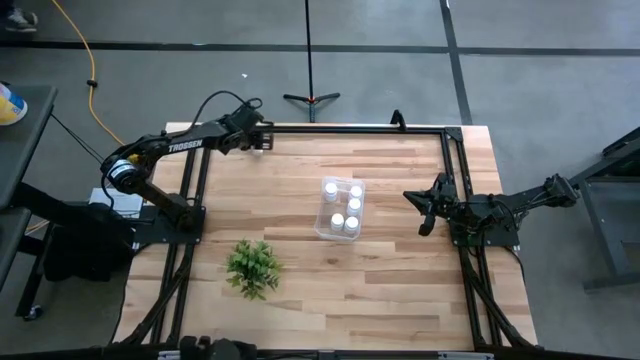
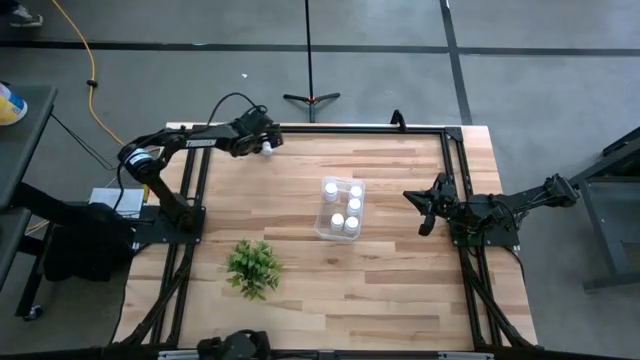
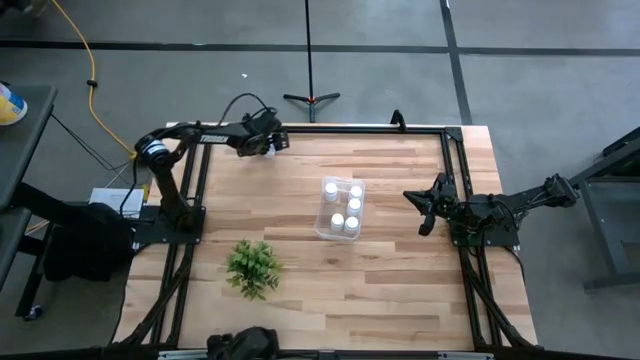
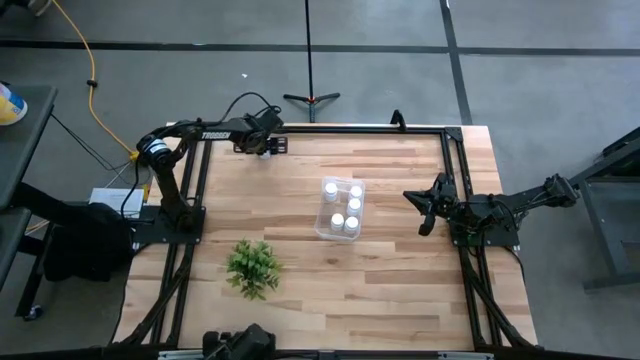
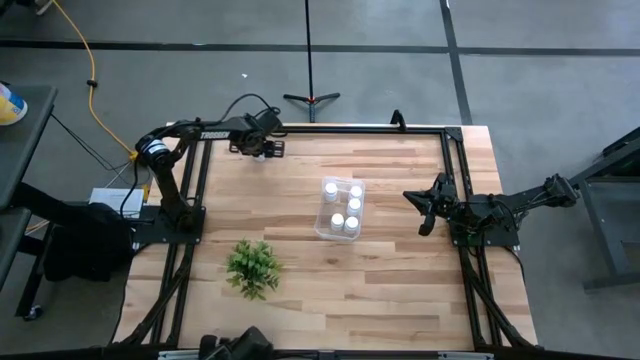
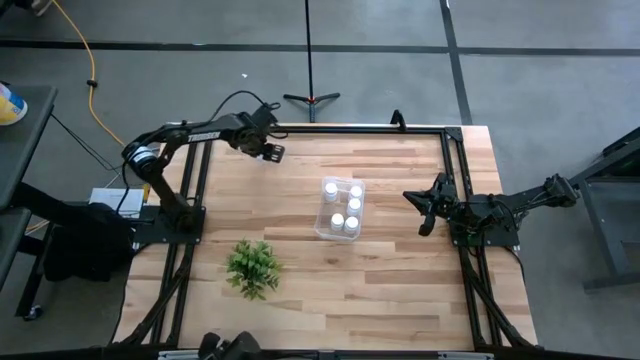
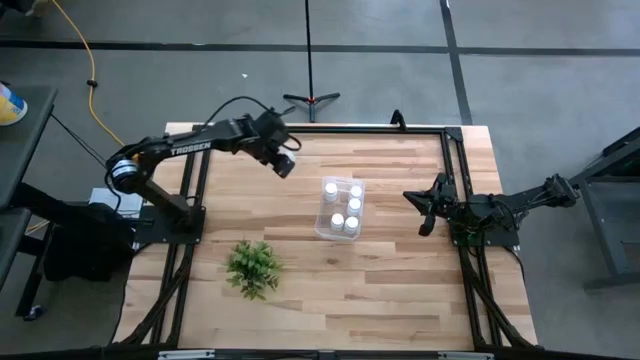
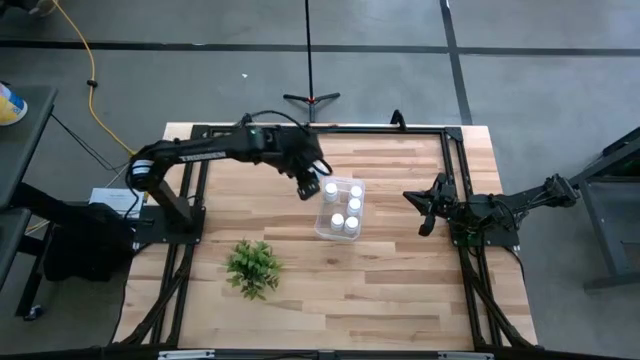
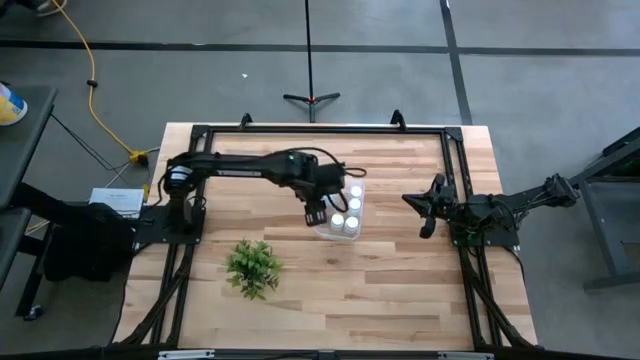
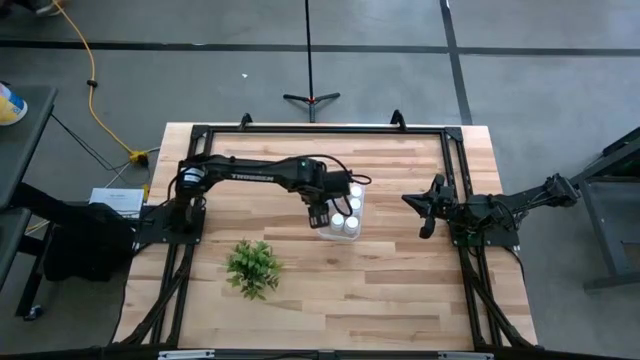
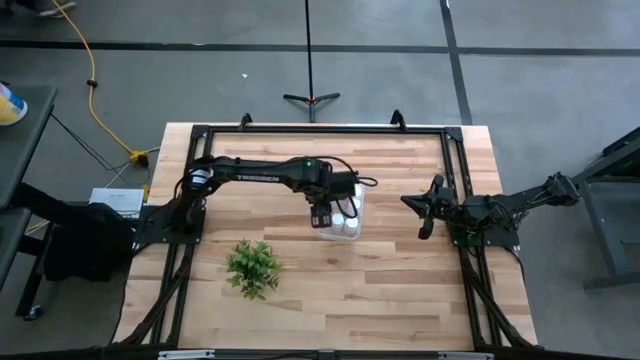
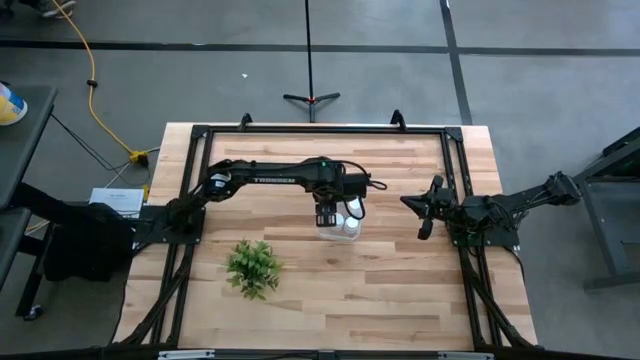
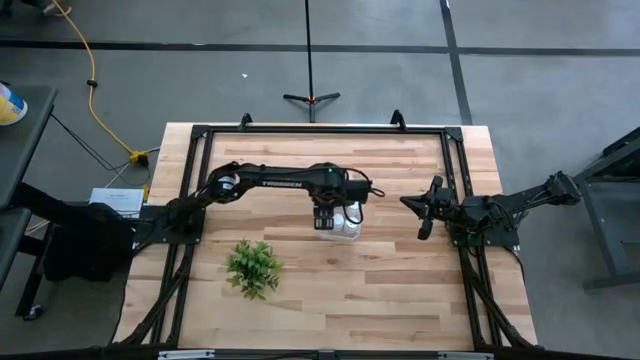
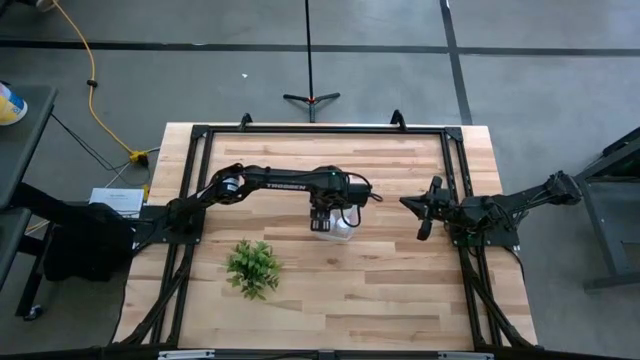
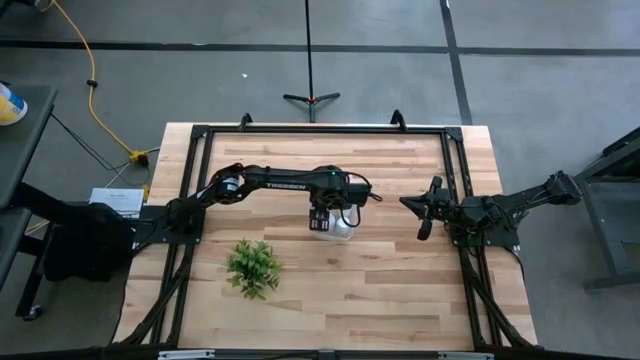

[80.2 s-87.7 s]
Task: Pick and place pill bottles into a basket
Put the white medicine bottle into the transparent bin

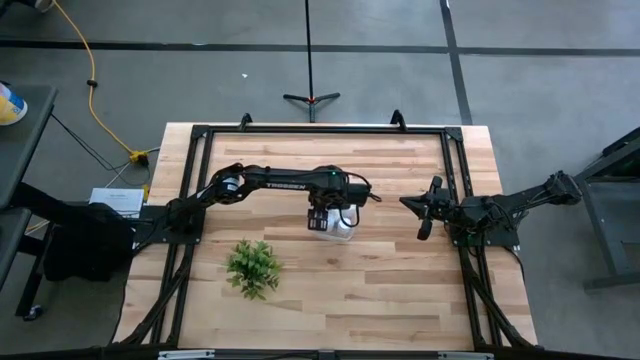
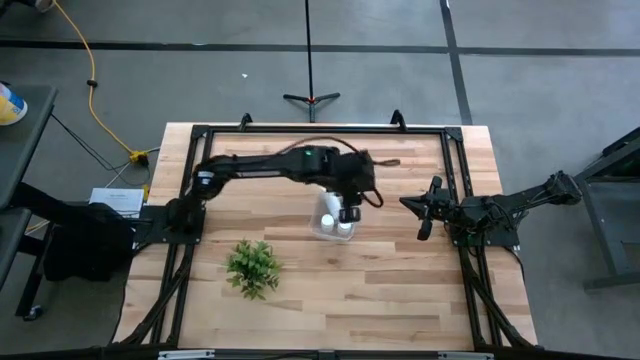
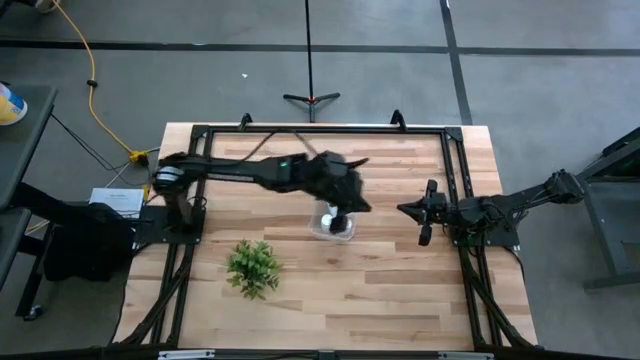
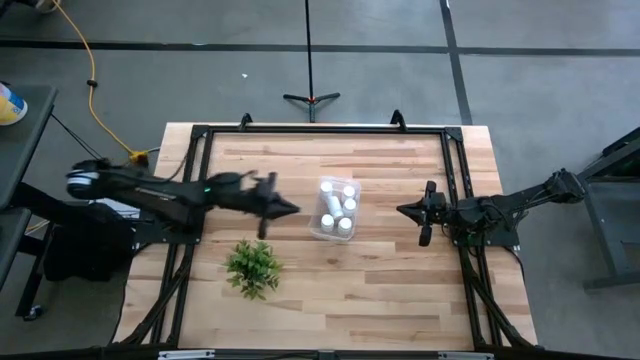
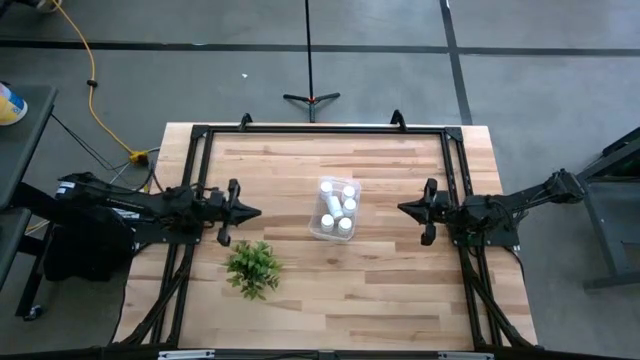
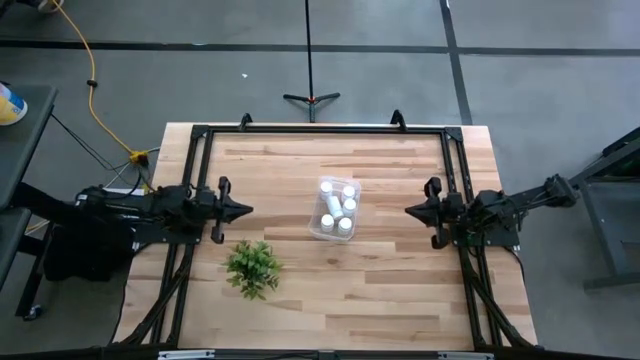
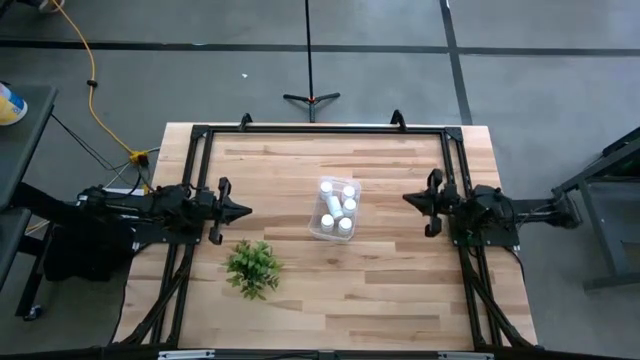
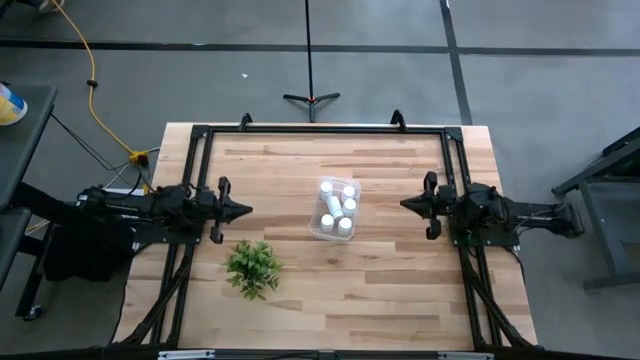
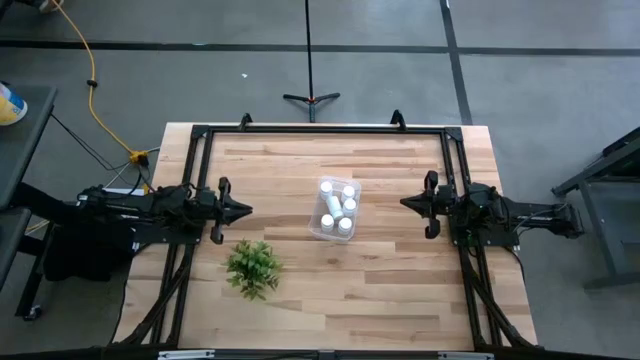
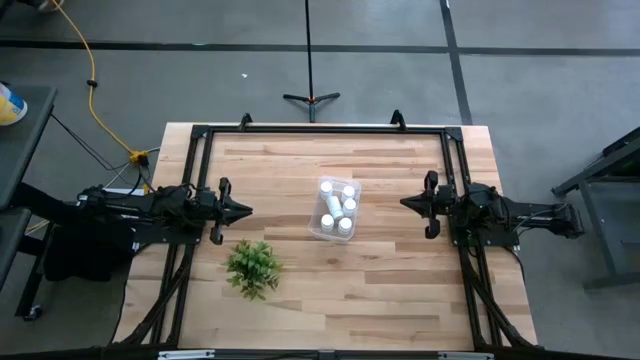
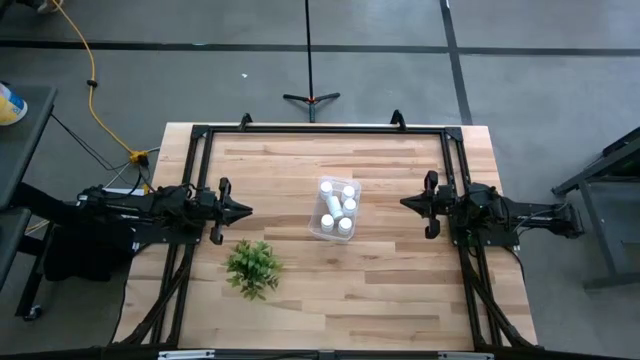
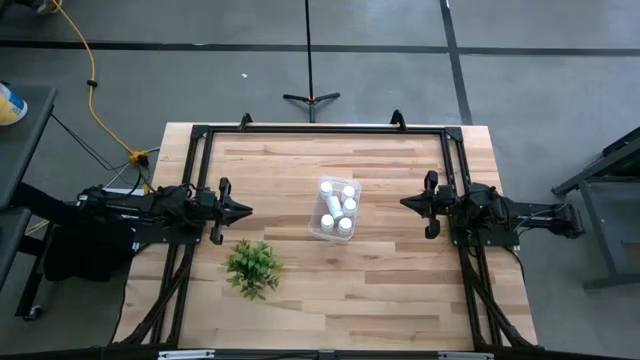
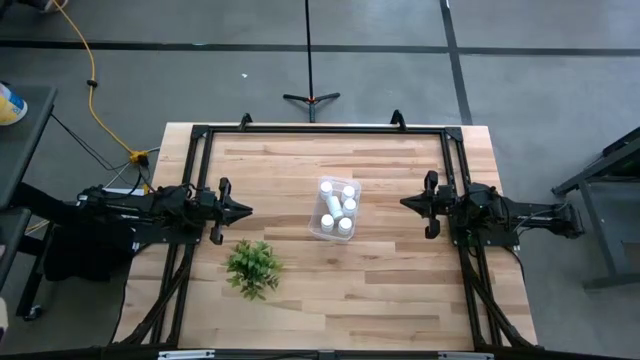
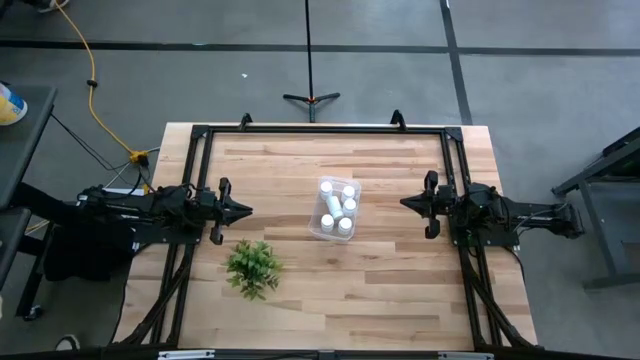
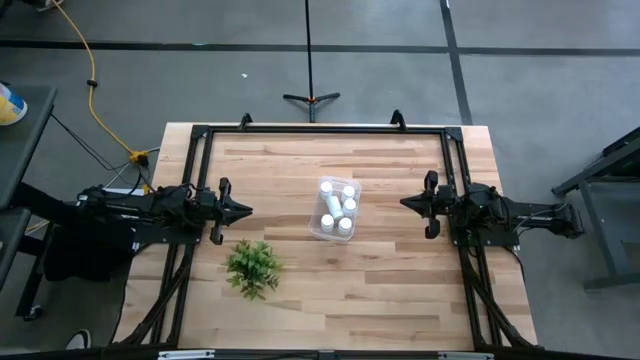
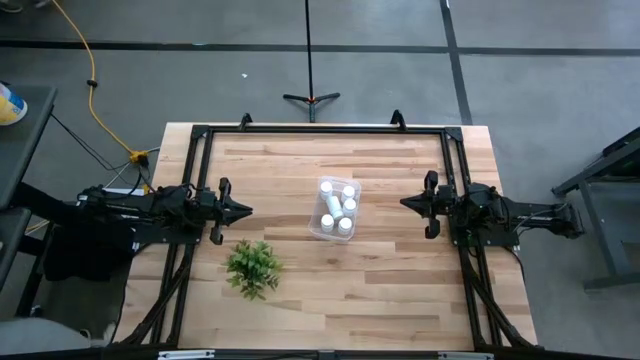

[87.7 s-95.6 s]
Return to Home Position

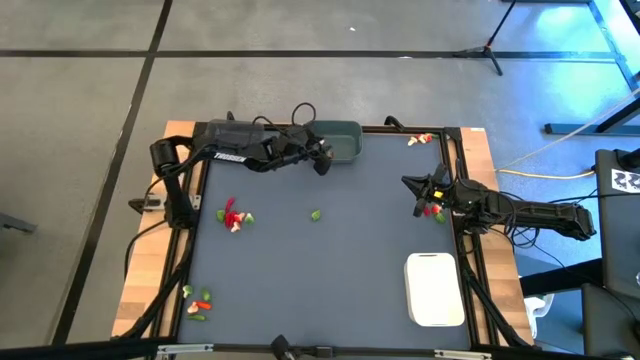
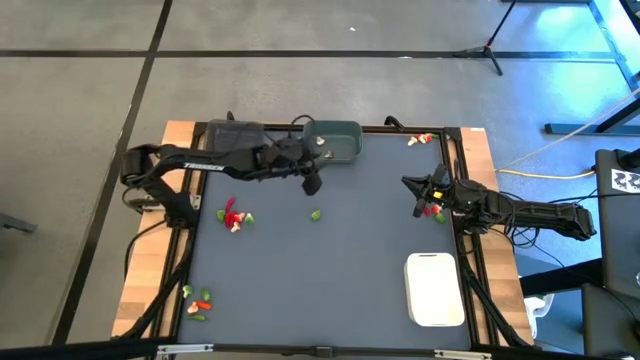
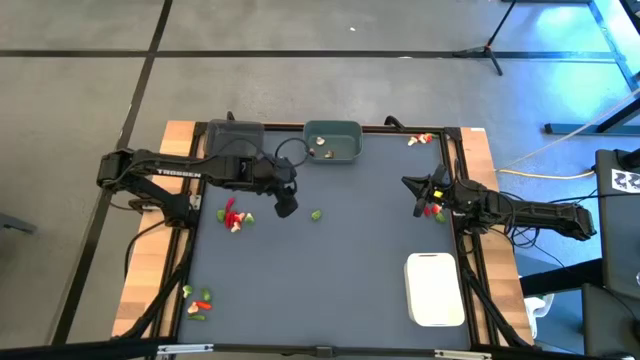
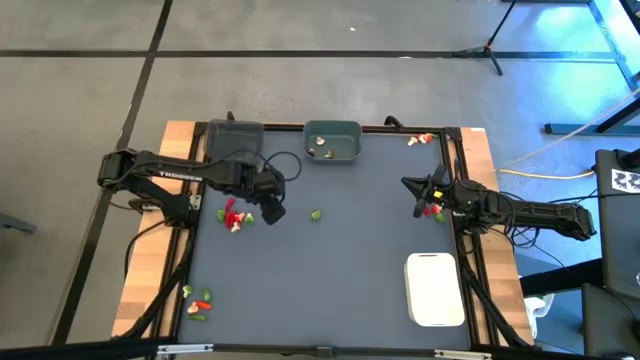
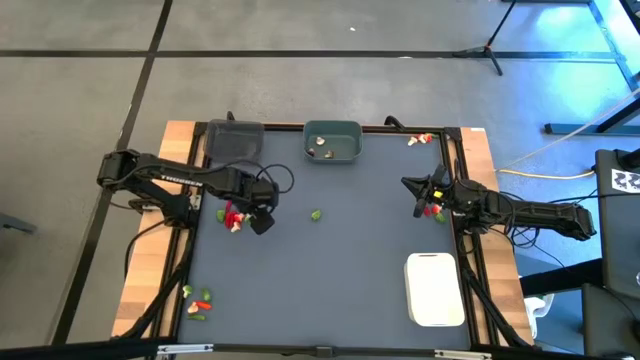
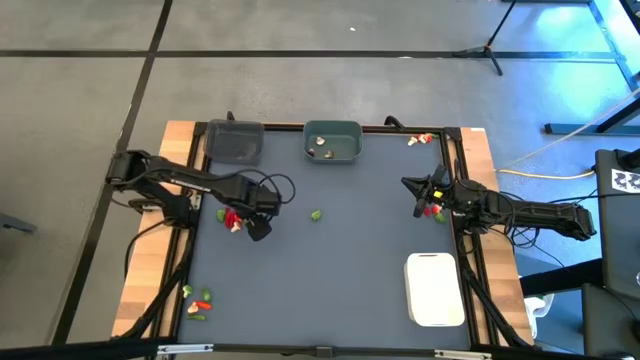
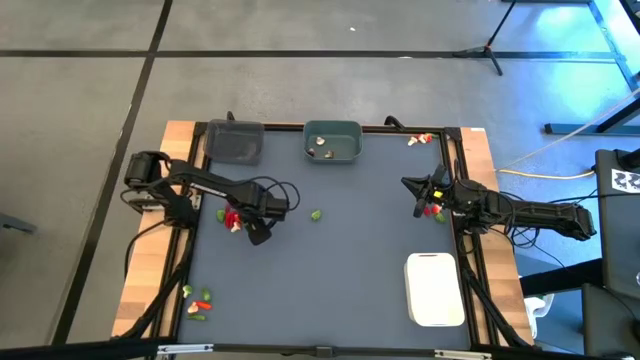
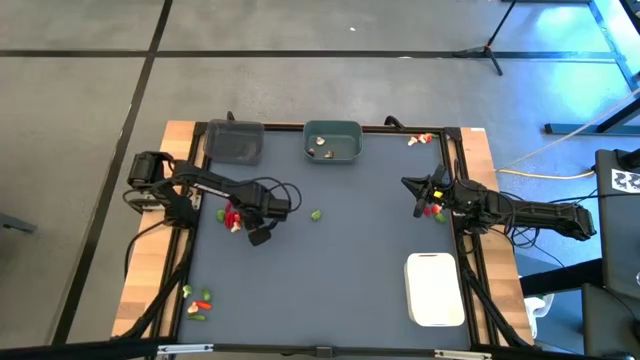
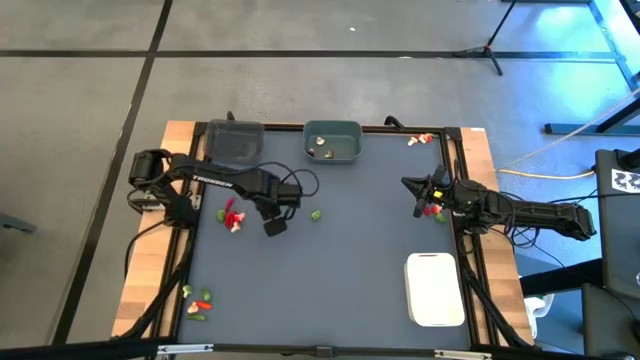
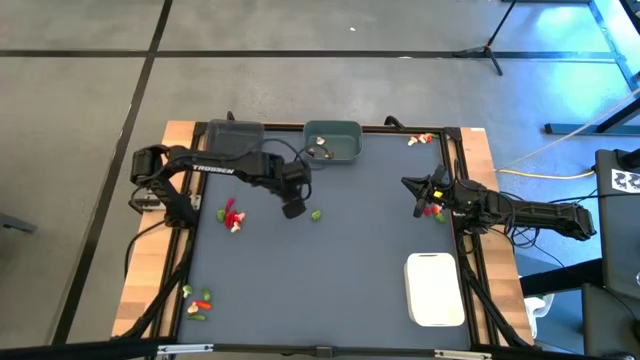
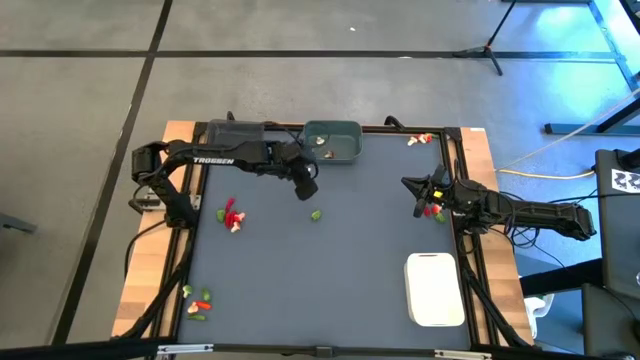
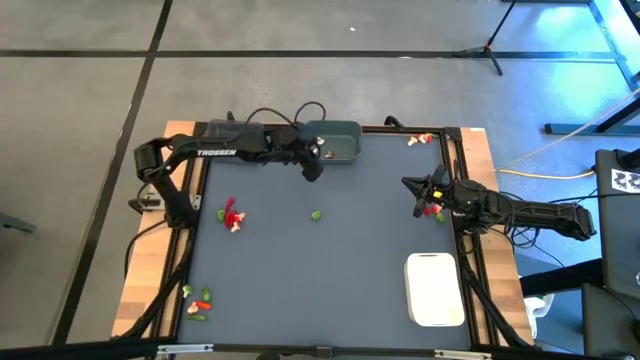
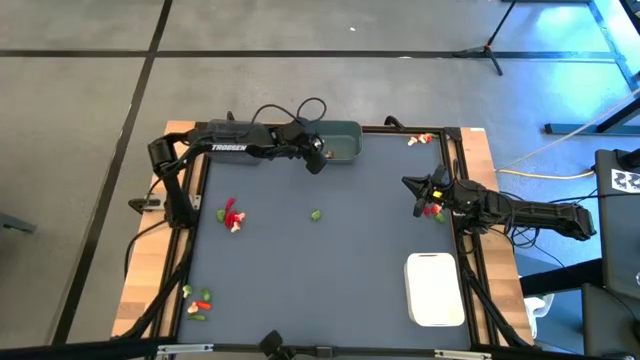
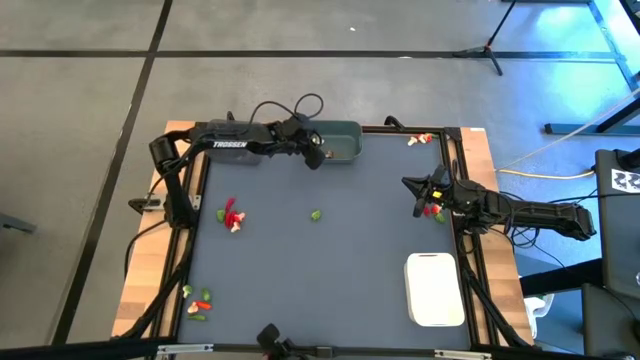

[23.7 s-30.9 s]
Task: Sort produce into baskets
Put the green mushroom into the blue bin
